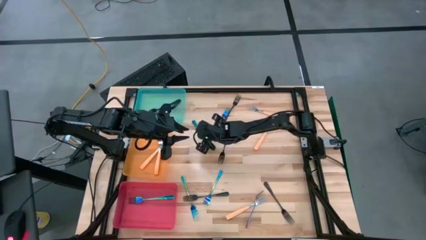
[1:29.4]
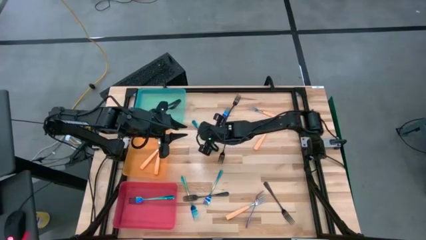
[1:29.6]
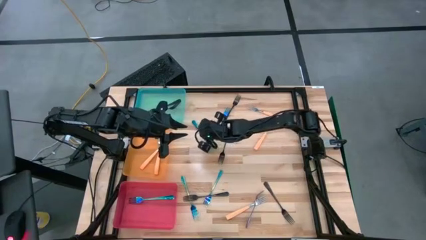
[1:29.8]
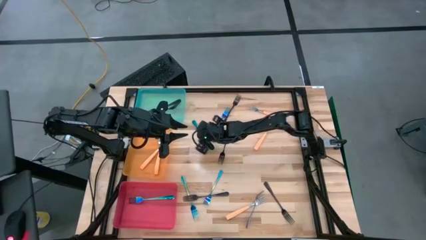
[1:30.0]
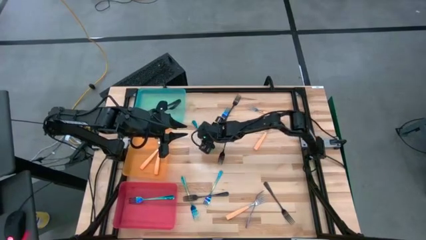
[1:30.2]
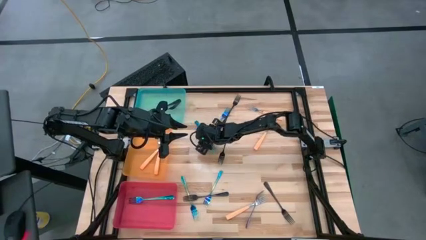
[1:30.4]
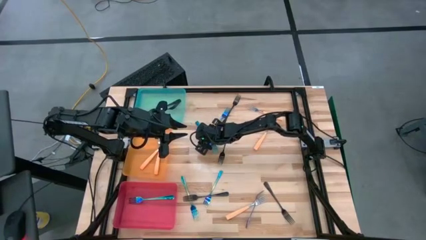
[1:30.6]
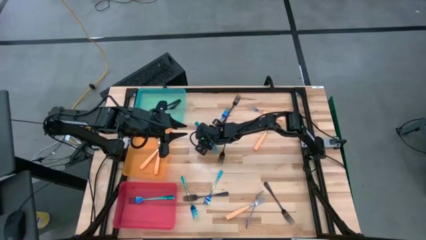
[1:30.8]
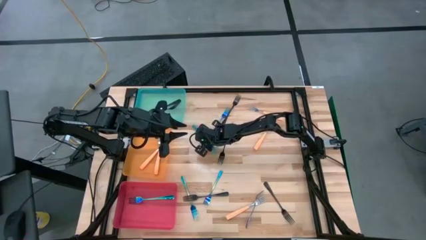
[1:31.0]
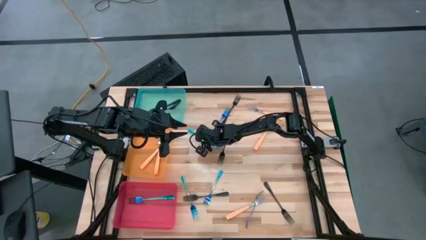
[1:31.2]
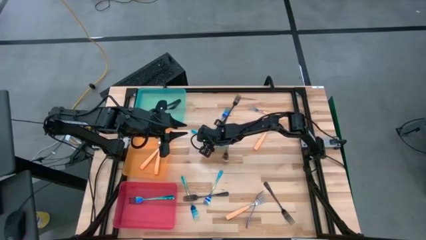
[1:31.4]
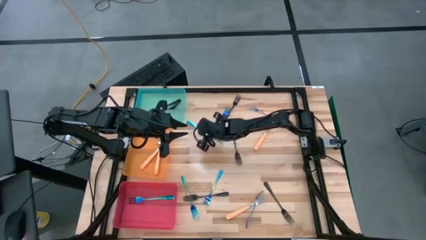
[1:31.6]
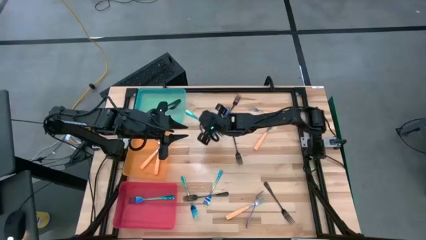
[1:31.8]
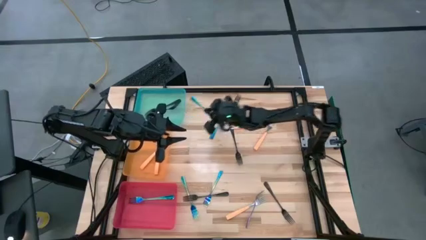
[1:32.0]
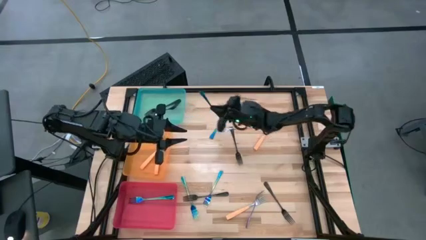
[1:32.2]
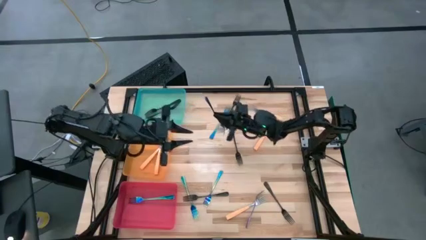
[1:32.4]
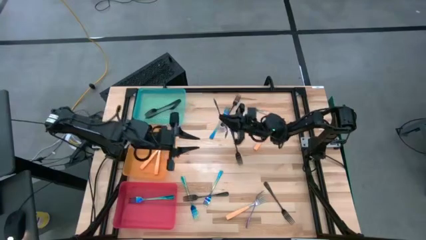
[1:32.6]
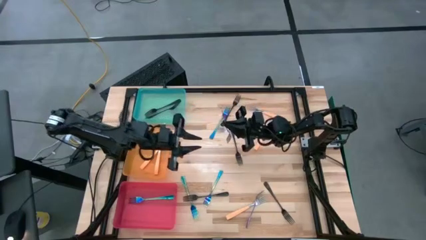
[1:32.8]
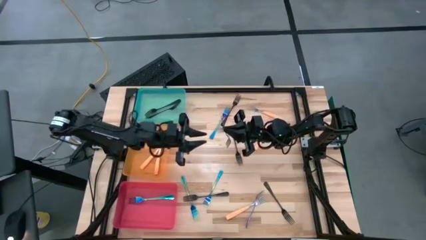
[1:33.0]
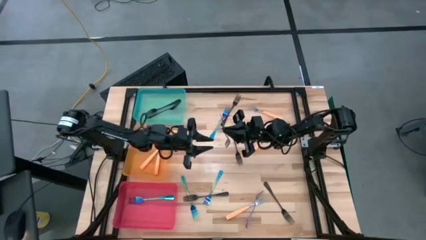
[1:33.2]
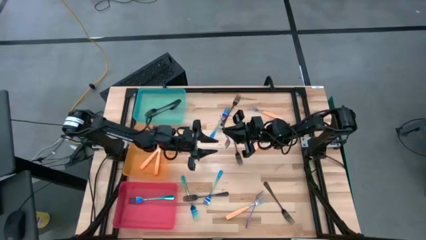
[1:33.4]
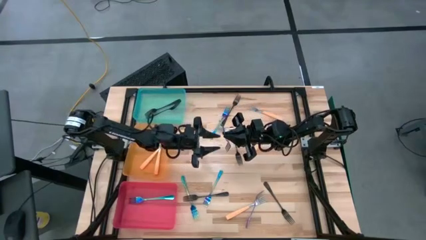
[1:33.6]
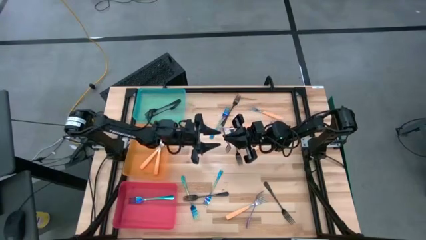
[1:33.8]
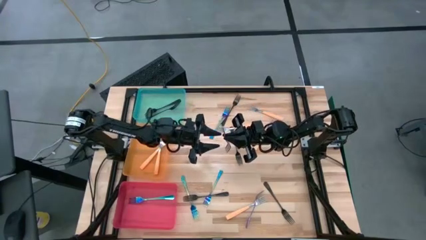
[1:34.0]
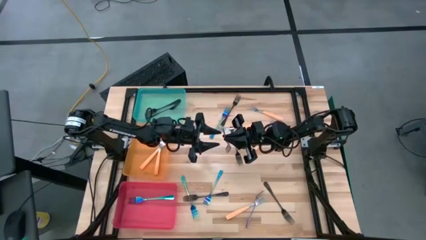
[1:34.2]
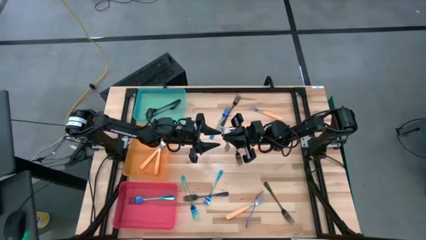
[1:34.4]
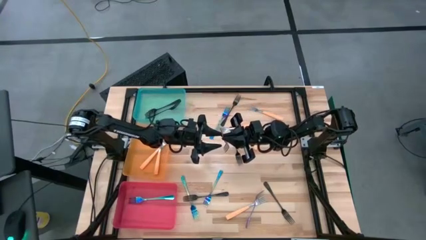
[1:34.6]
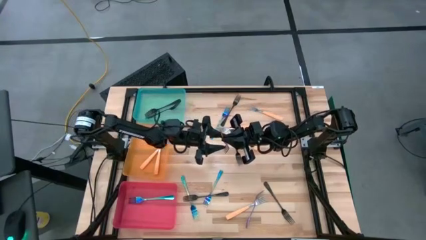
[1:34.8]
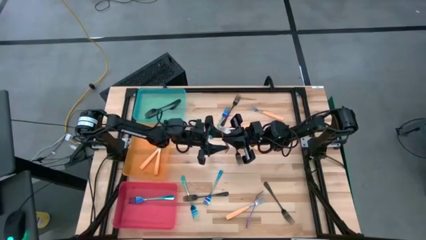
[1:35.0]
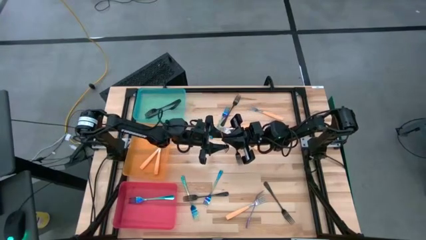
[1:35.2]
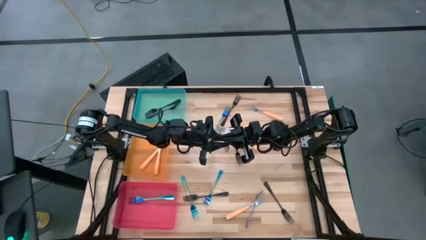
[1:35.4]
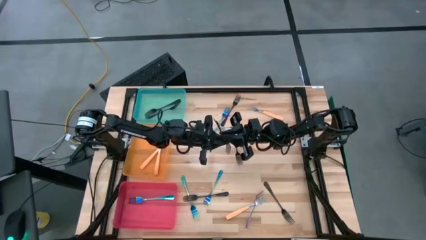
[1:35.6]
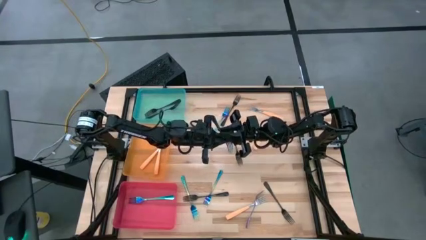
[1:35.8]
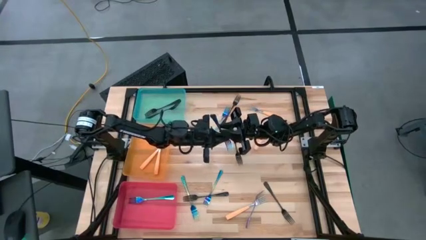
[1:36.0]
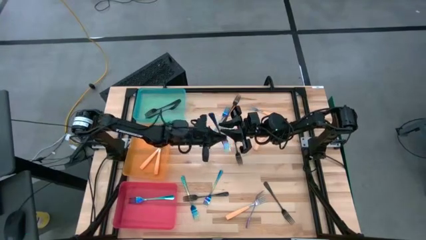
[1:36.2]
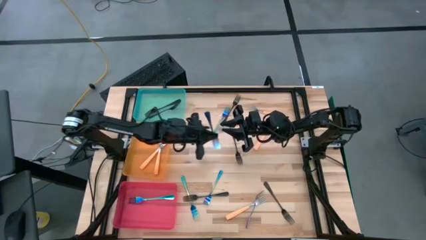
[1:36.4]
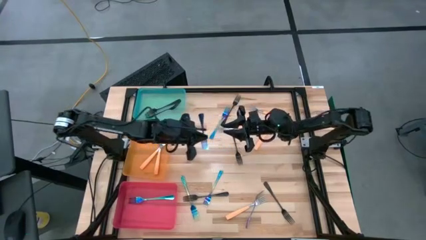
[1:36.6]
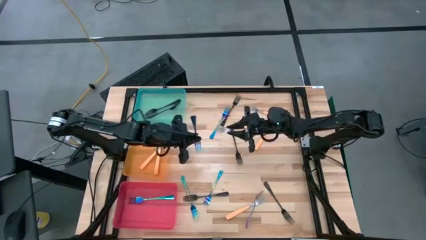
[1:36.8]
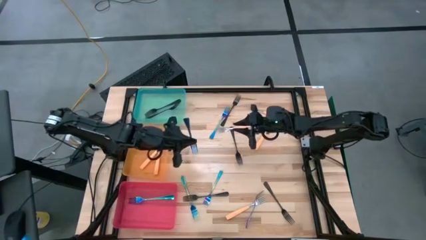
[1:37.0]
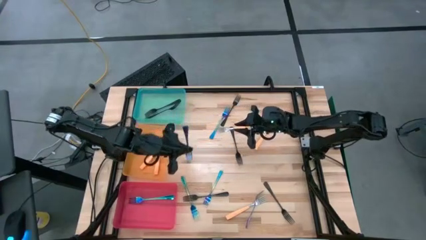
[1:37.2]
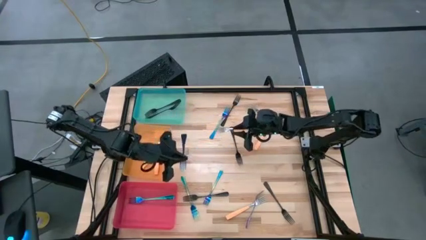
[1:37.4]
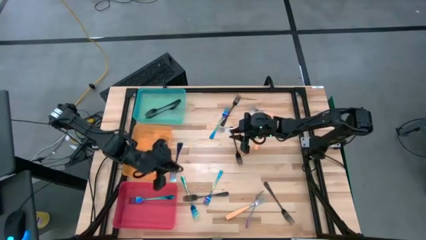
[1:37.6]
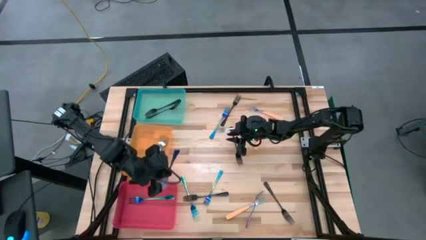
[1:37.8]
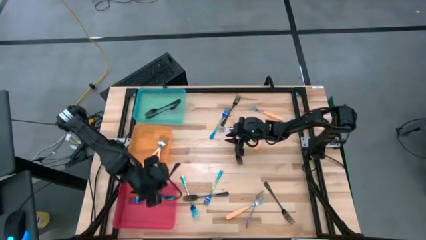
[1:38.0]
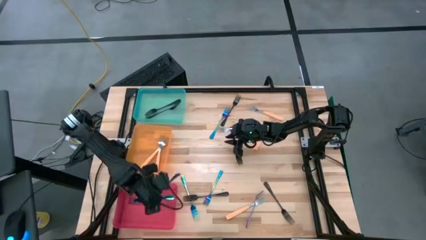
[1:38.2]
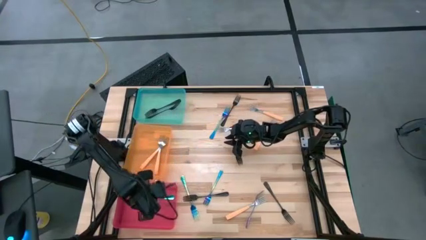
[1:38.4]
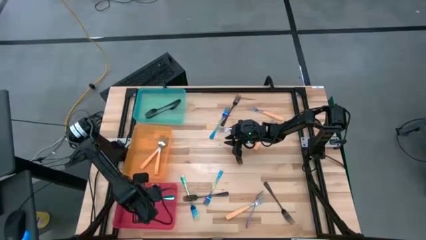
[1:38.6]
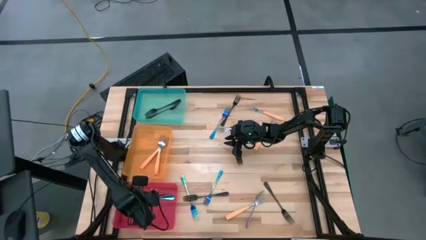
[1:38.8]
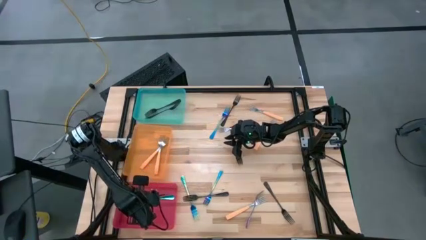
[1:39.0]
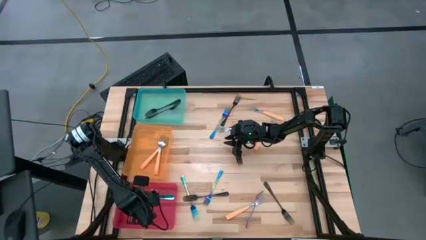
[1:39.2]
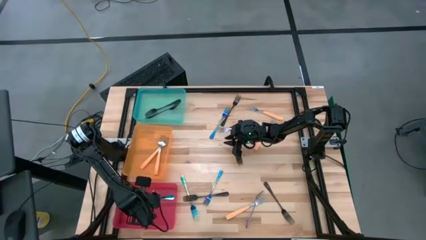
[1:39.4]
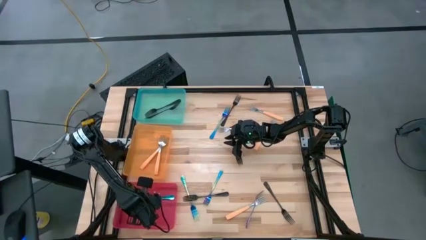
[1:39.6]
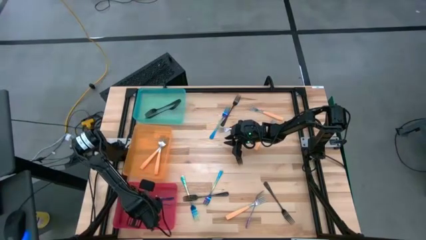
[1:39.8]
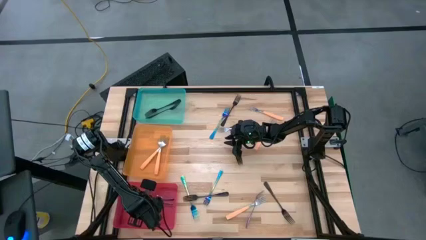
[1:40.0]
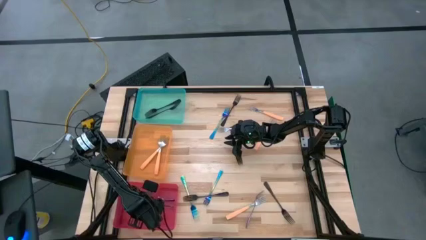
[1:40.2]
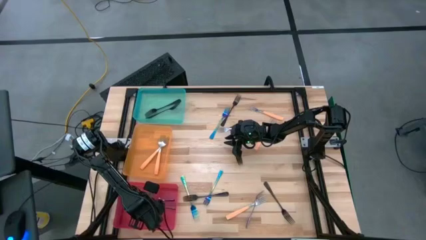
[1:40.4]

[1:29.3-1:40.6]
Task: Sort silverware by color (type)
Put the blue fork into the pink bin
